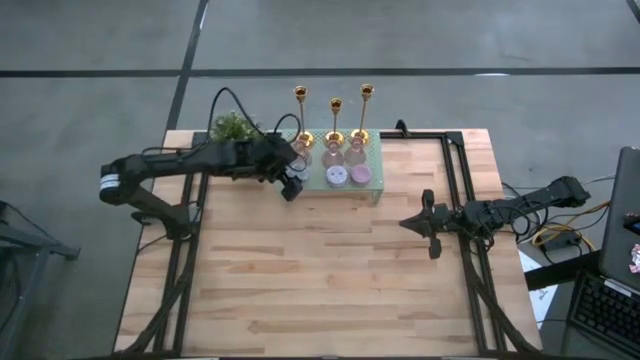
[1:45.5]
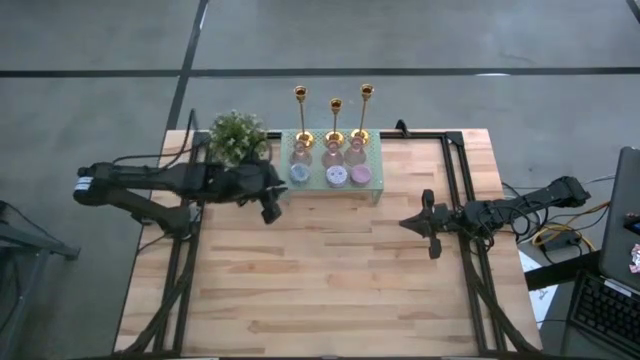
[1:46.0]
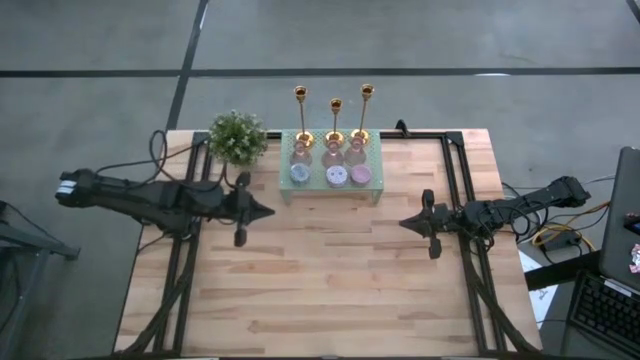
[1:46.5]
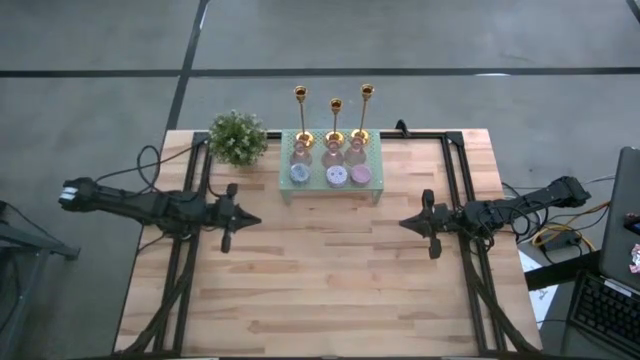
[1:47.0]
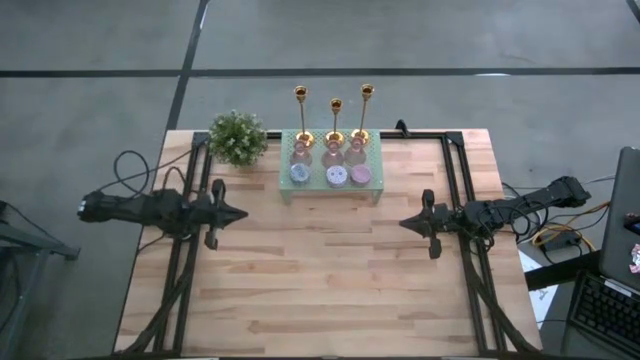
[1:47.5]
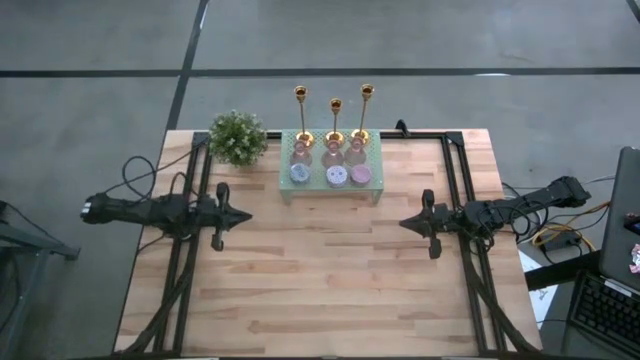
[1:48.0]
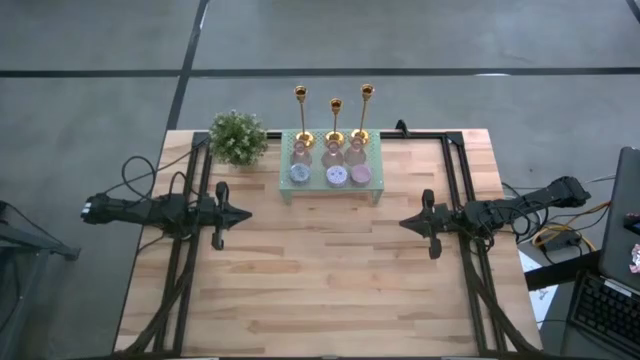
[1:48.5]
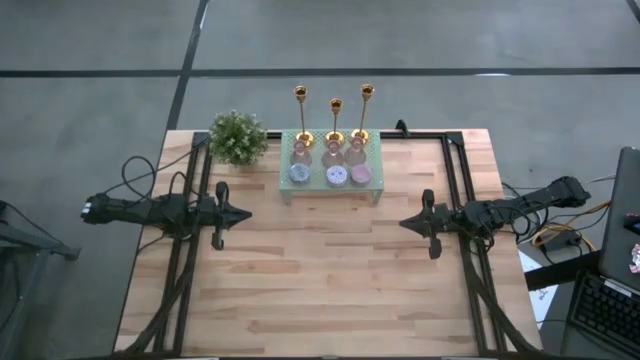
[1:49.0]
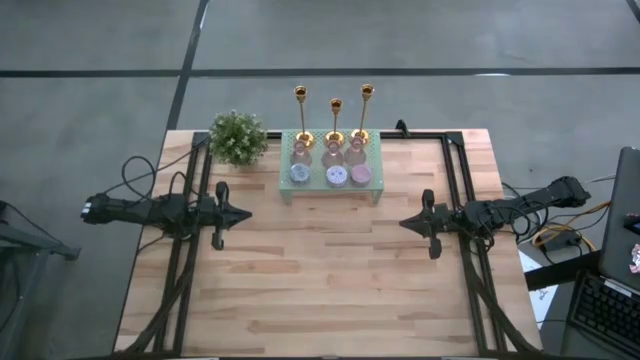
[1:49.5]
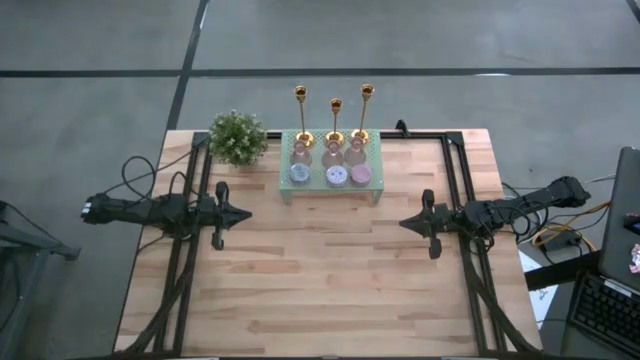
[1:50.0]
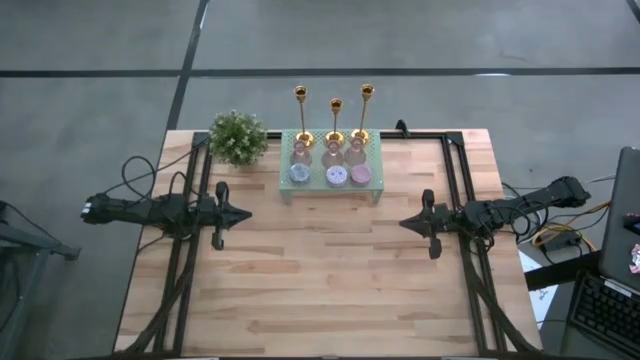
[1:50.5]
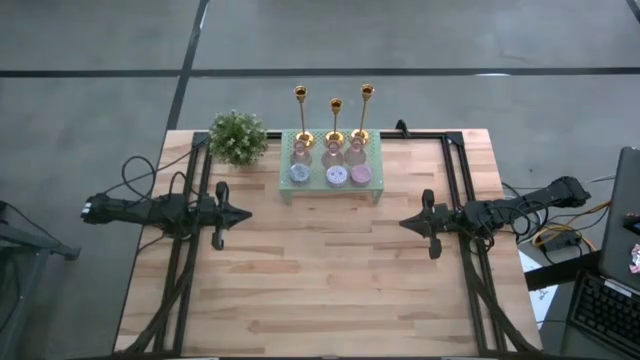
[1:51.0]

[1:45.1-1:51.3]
Task: Stock candles and vases on shelf
Return to Home Position

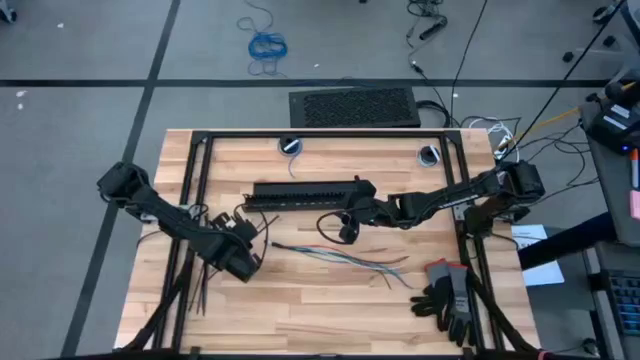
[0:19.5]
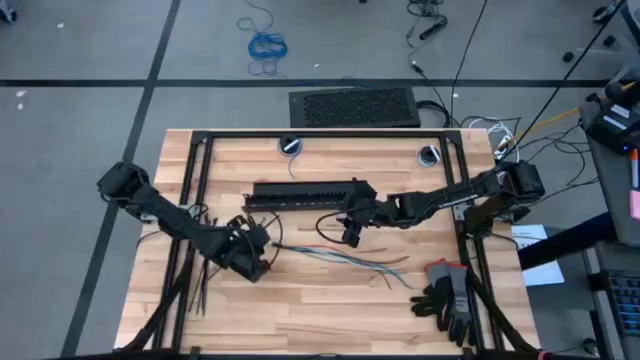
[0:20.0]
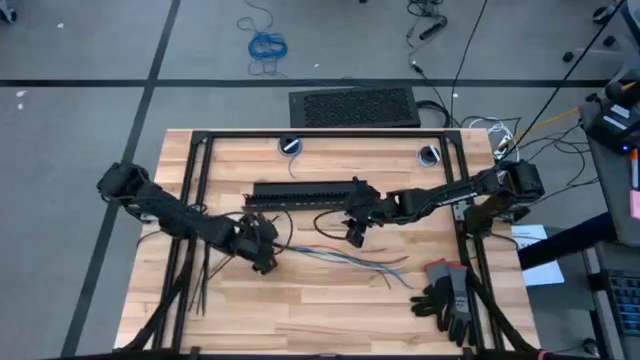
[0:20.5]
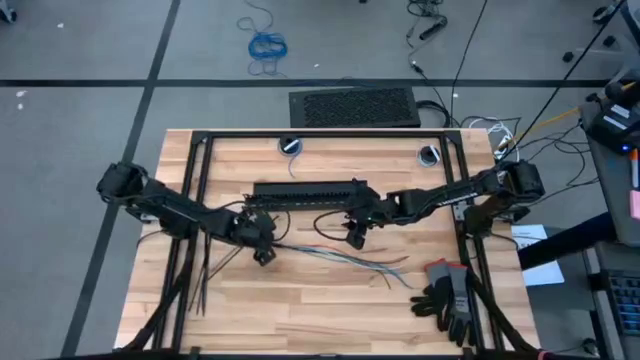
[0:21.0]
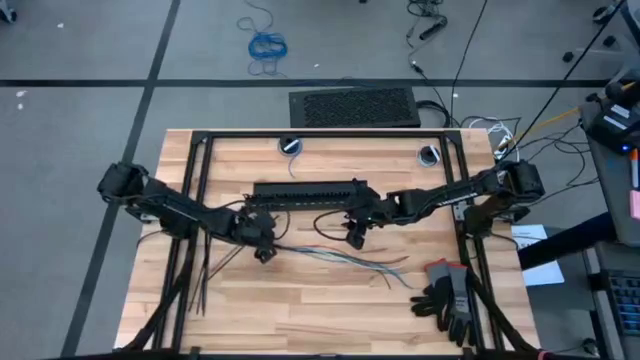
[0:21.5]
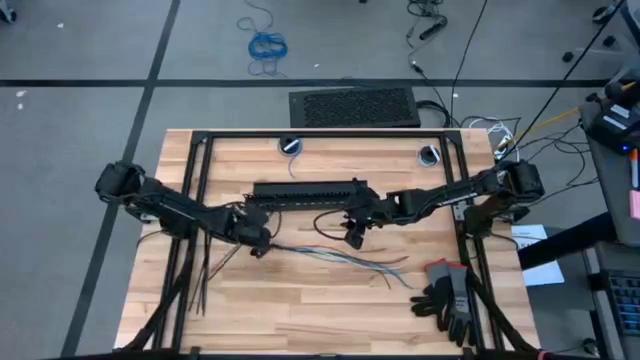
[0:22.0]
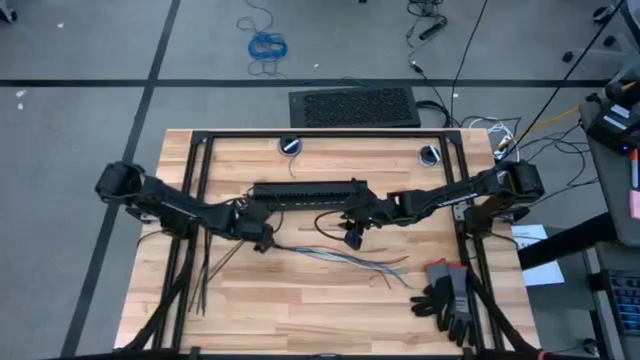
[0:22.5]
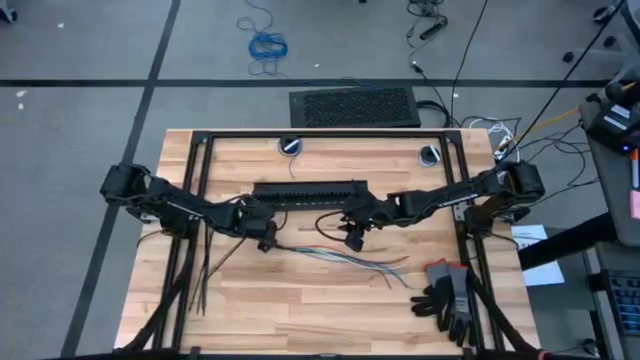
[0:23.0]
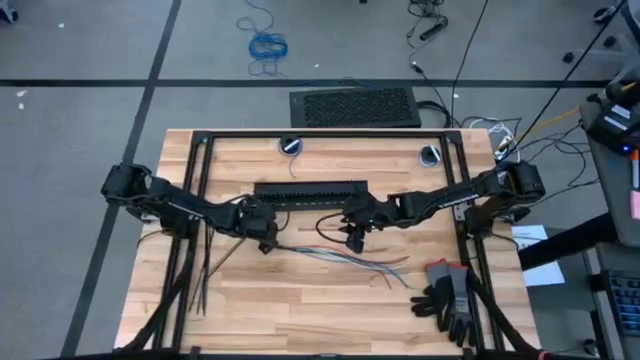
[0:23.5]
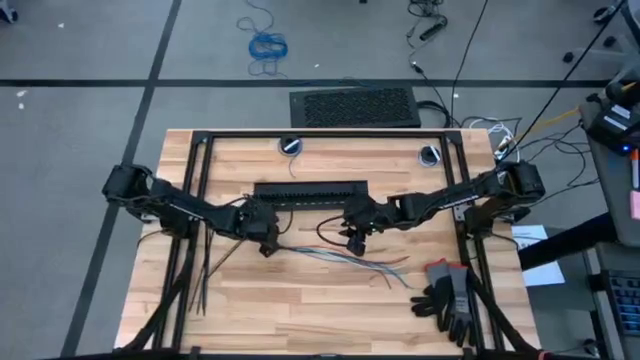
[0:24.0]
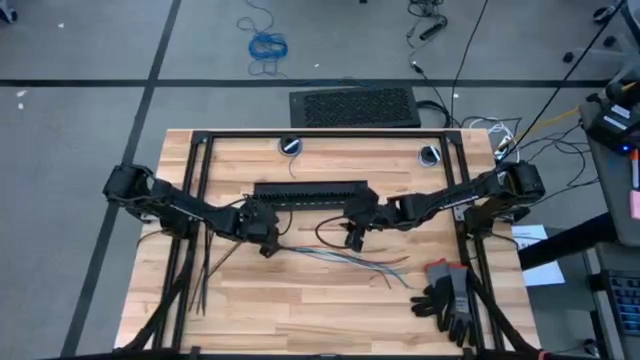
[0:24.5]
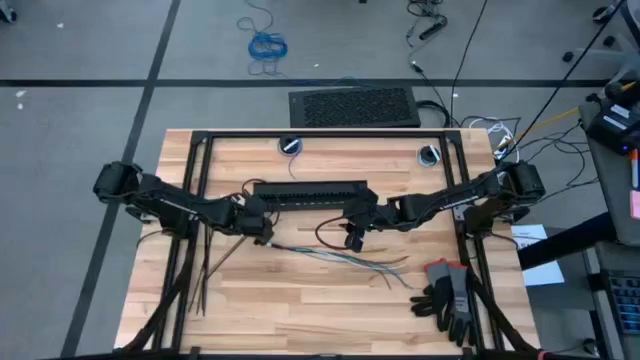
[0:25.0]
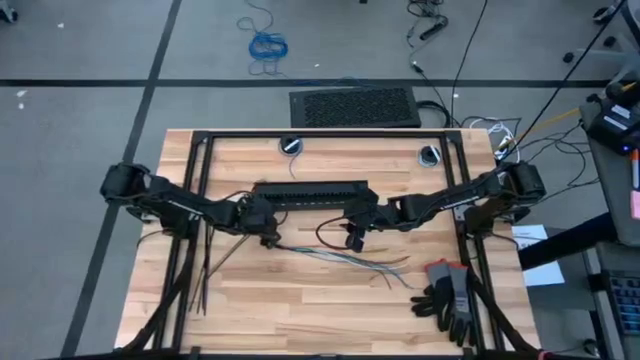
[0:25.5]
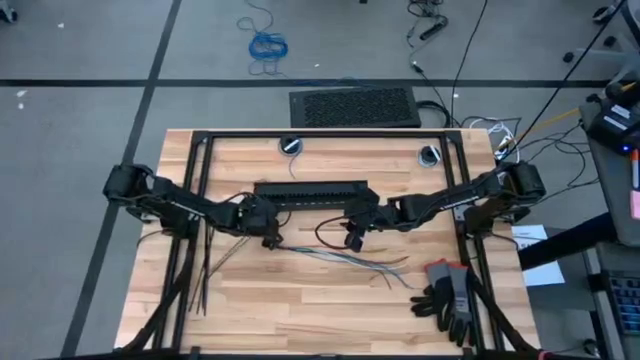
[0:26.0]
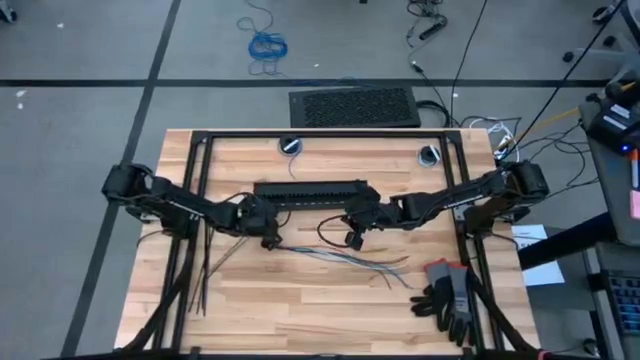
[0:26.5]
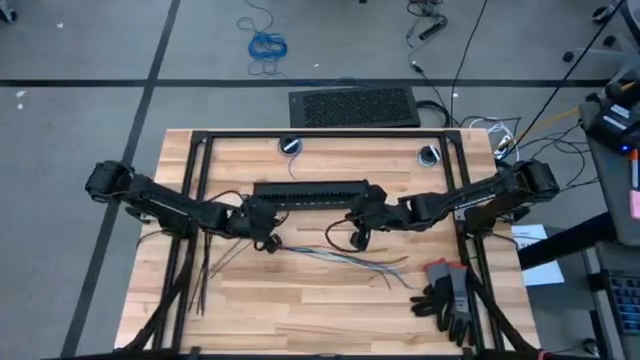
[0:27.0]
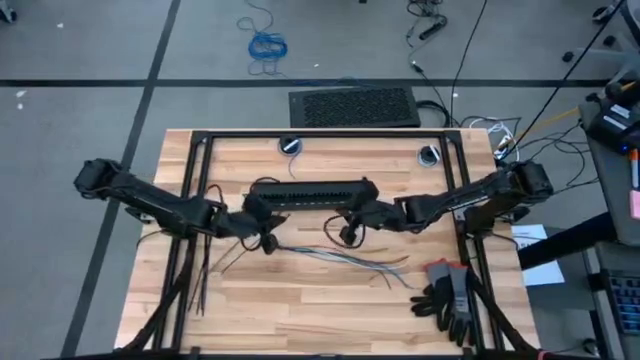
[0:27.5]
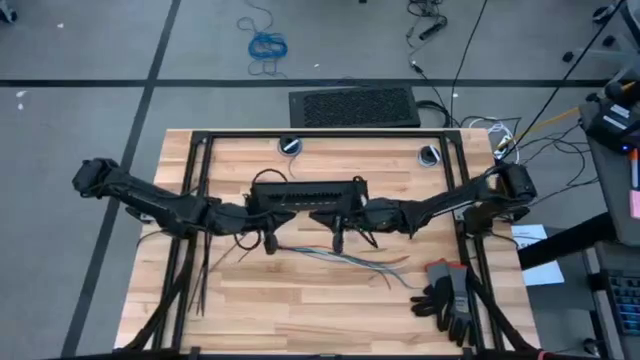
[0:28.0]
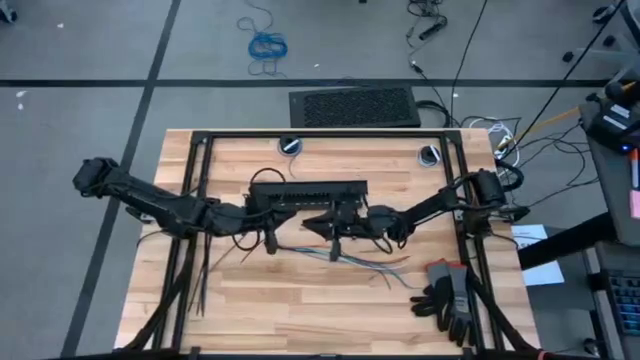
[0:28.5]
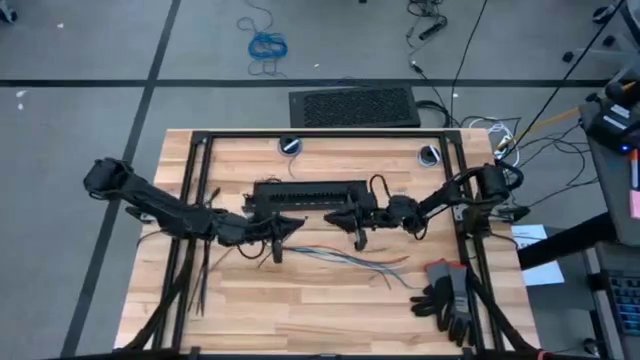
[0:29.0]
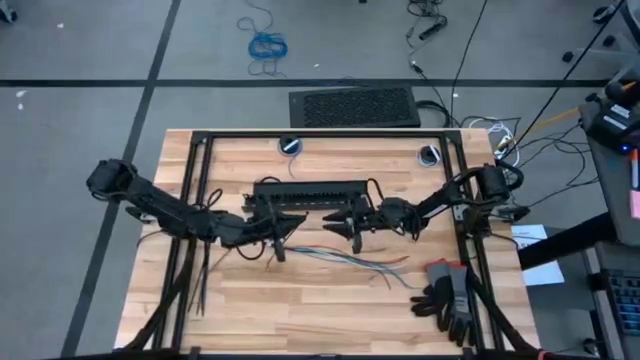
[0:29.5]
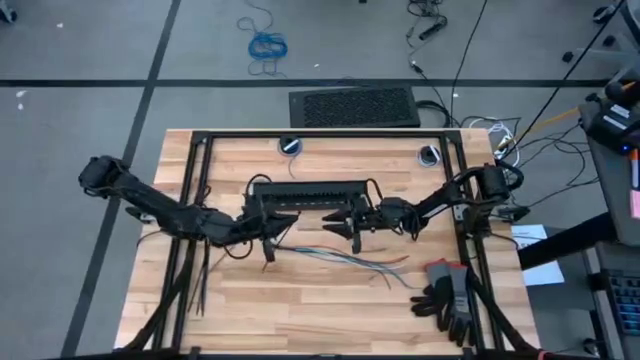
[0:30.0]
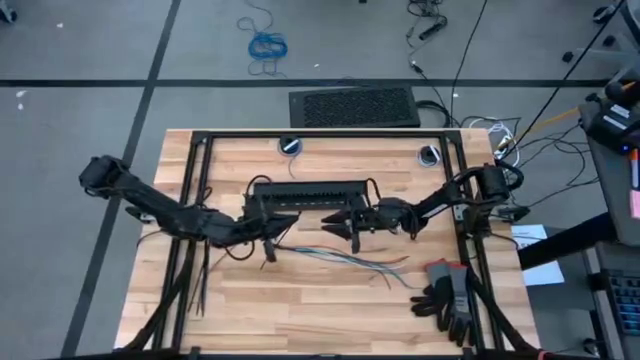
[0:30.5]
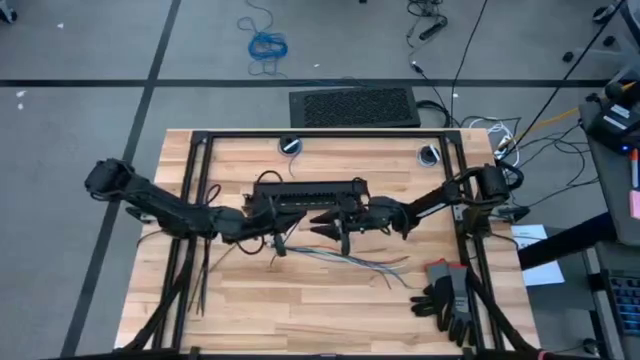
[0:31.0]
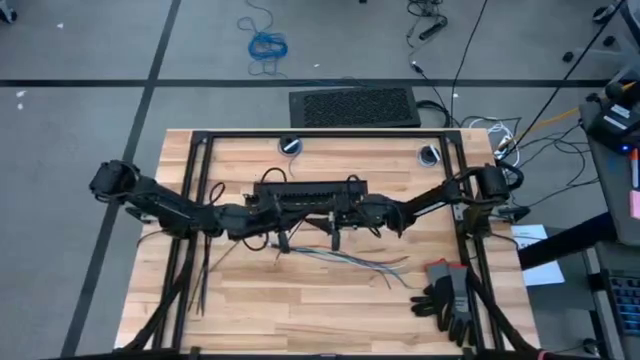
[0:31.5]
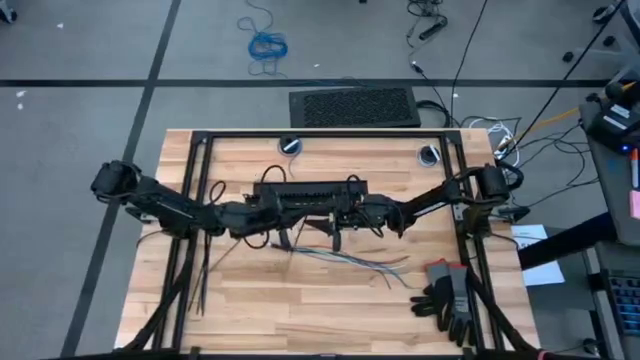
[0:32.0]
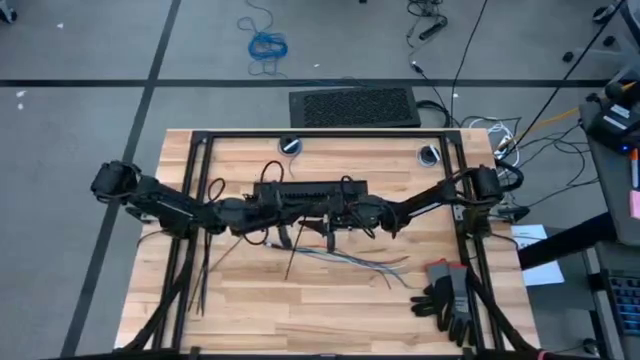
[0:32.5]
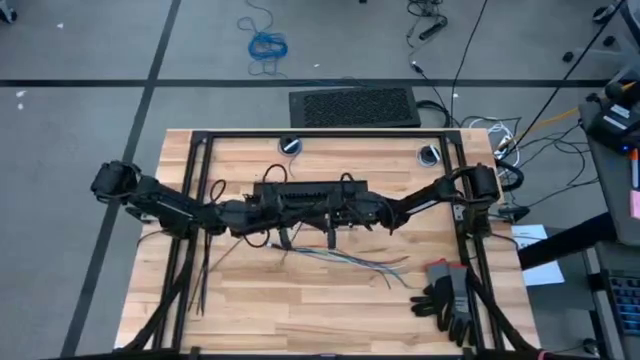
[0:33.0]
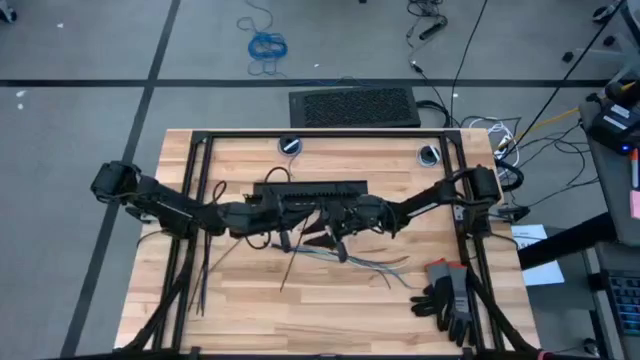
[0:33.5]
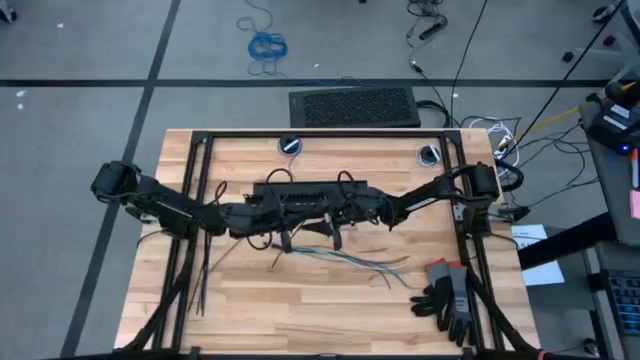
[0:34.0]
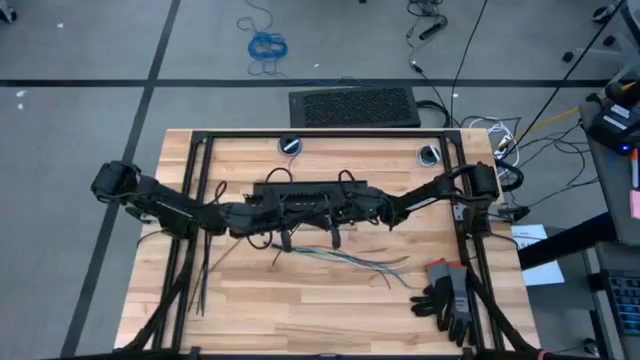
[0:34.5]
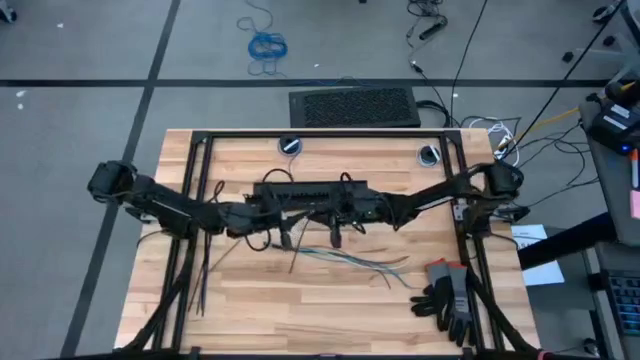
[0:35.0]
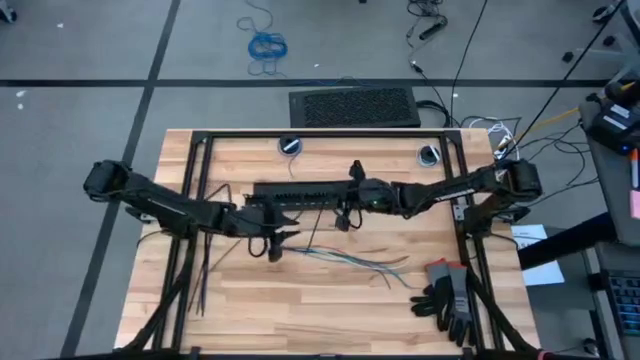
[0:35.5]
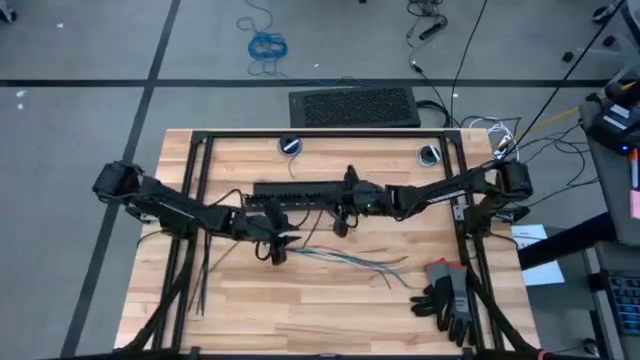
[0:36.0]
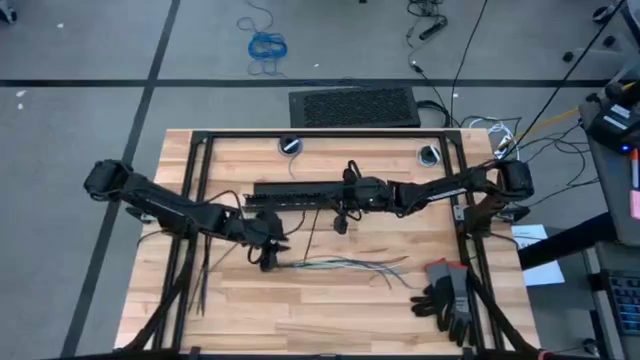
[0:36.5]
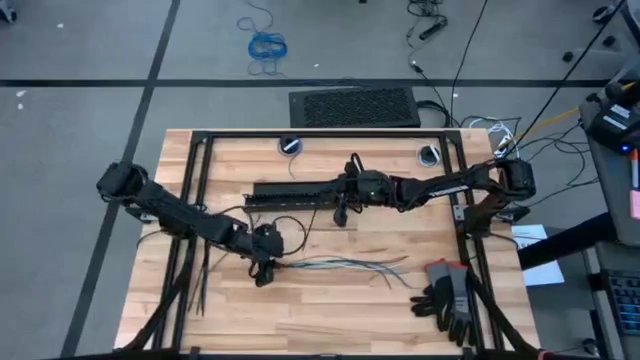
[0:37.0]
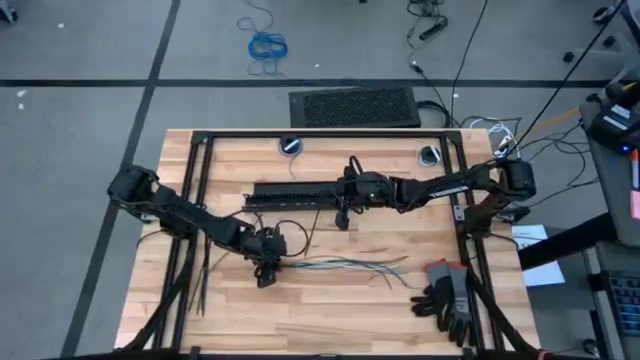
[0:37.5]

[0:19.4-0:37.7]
Task: Ziptie cables
Wrap the cable wires with zip tie
